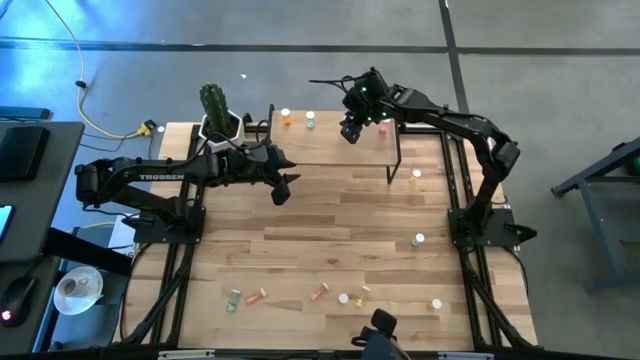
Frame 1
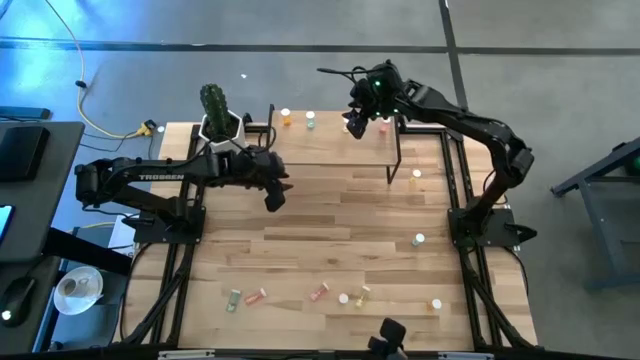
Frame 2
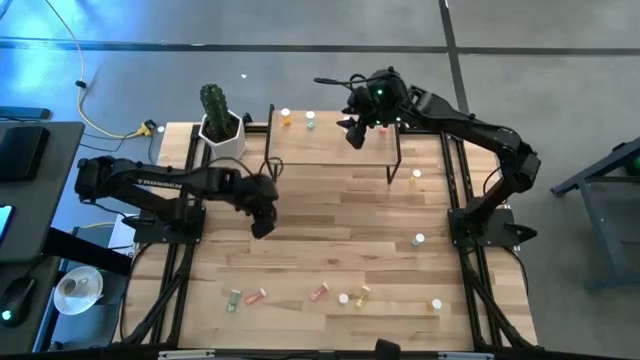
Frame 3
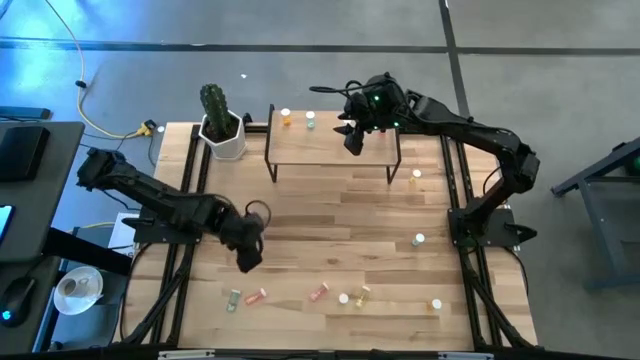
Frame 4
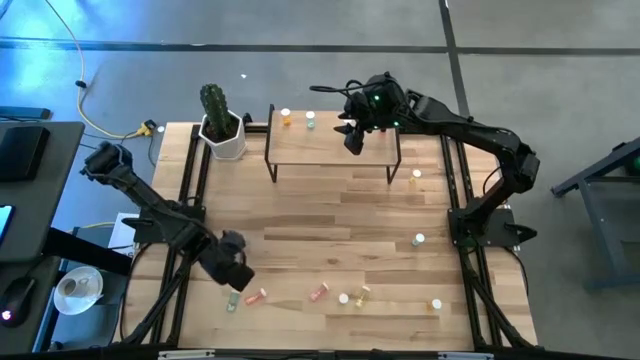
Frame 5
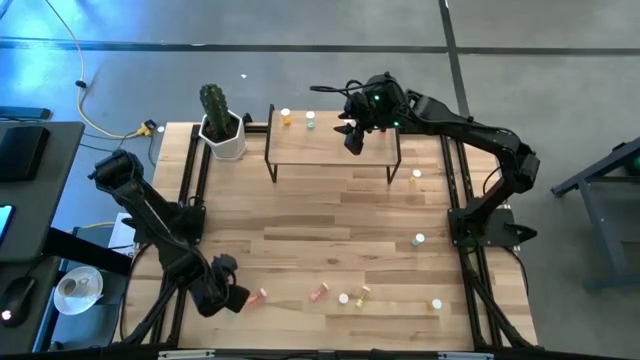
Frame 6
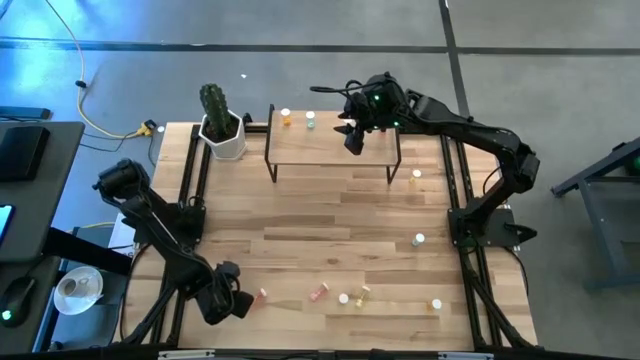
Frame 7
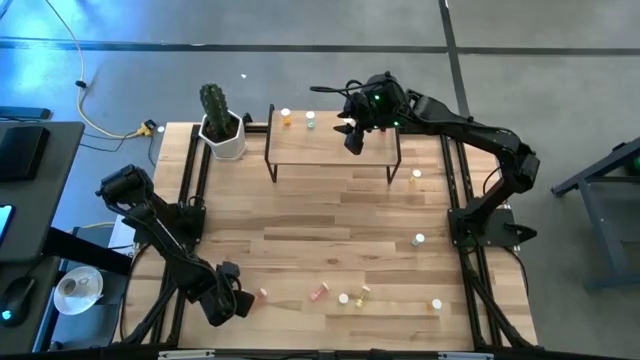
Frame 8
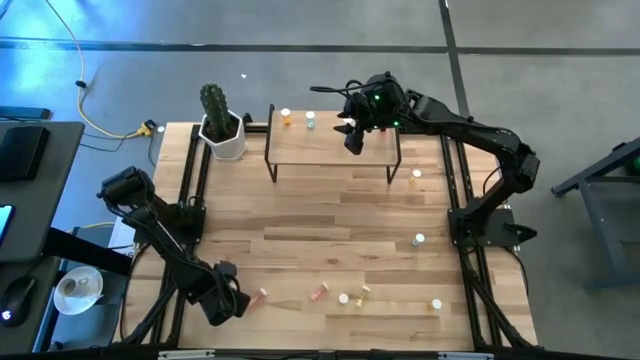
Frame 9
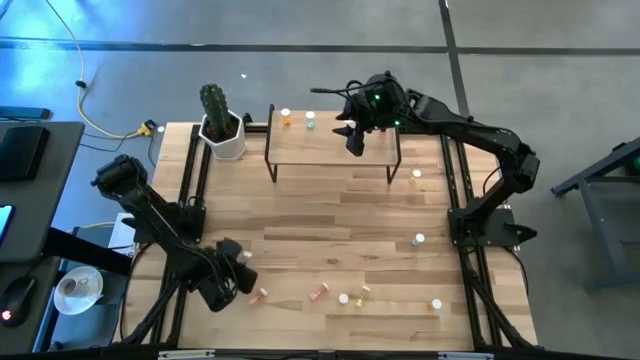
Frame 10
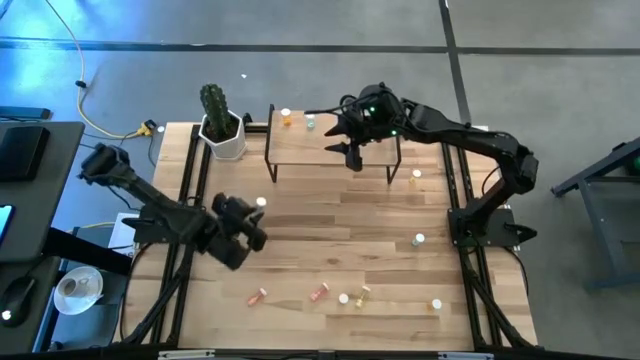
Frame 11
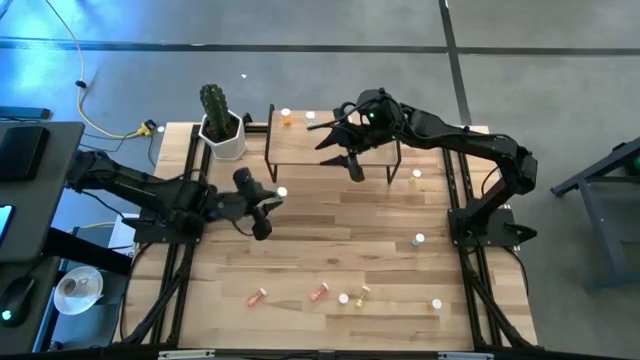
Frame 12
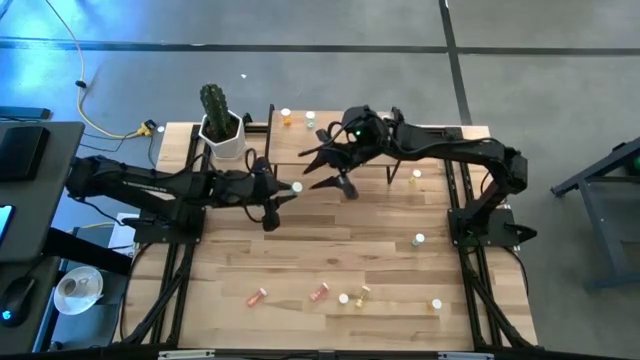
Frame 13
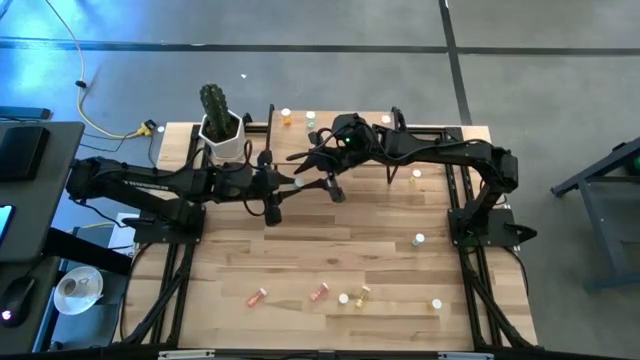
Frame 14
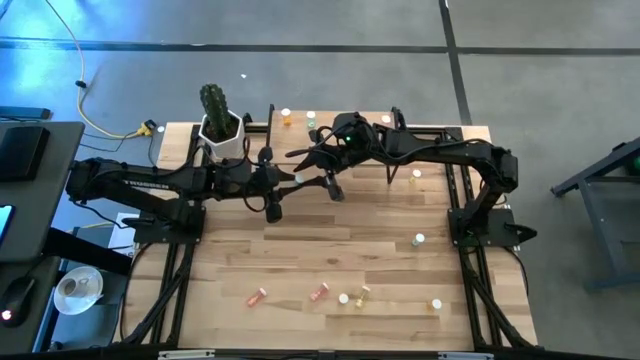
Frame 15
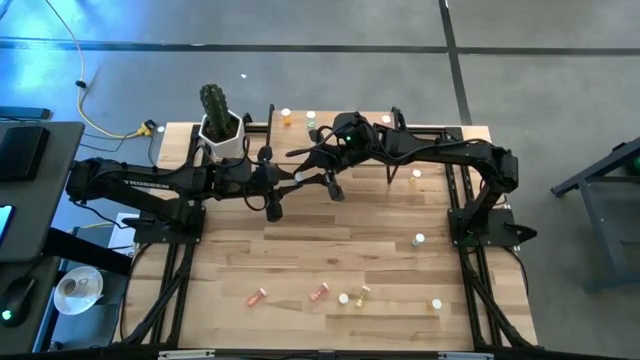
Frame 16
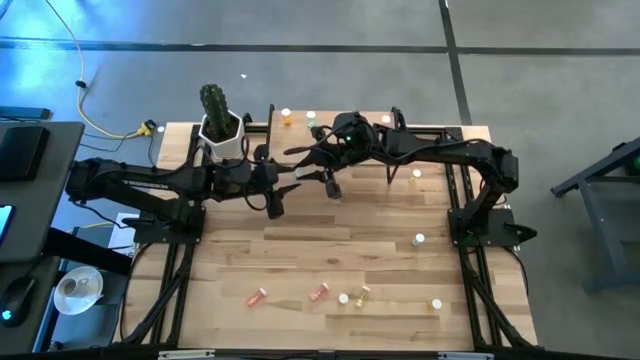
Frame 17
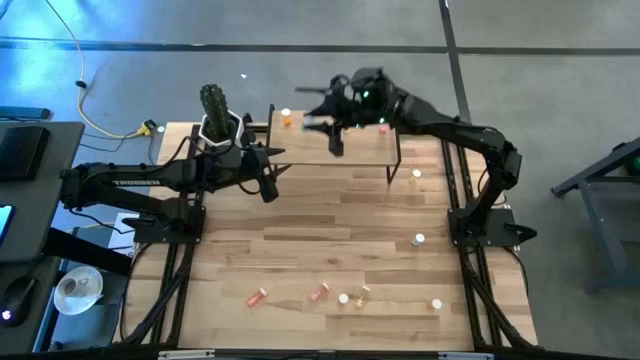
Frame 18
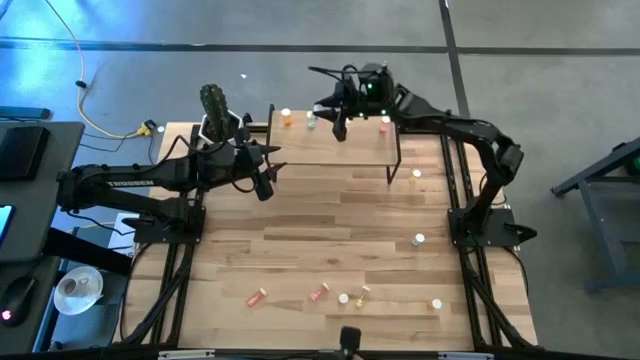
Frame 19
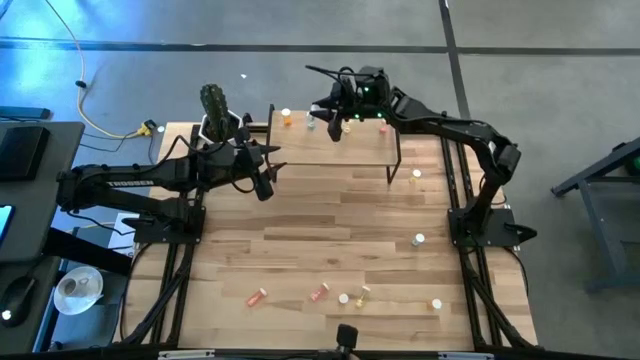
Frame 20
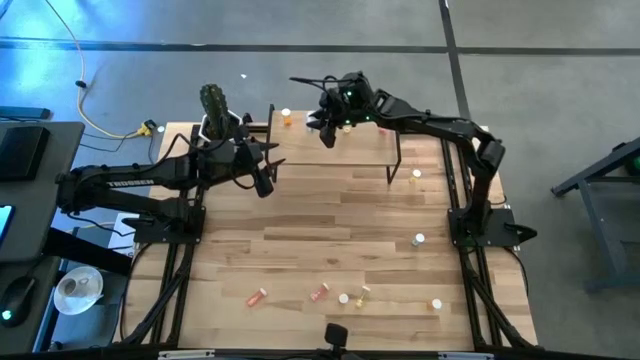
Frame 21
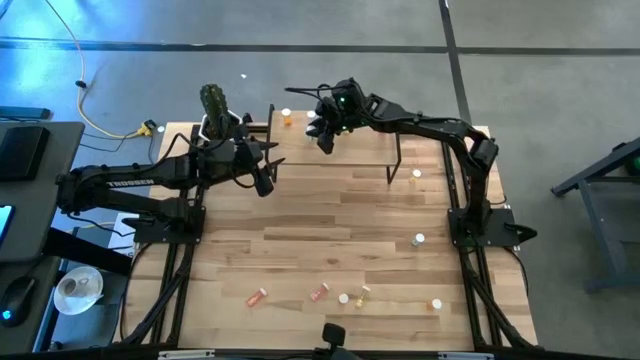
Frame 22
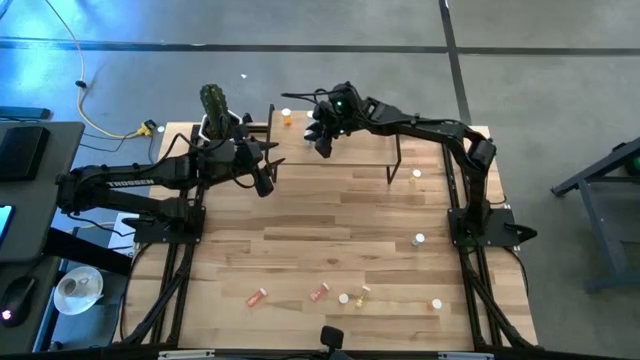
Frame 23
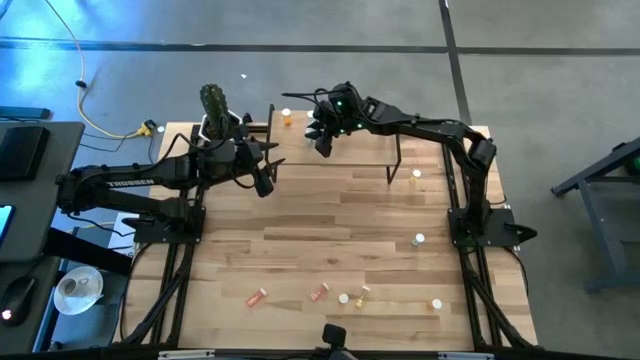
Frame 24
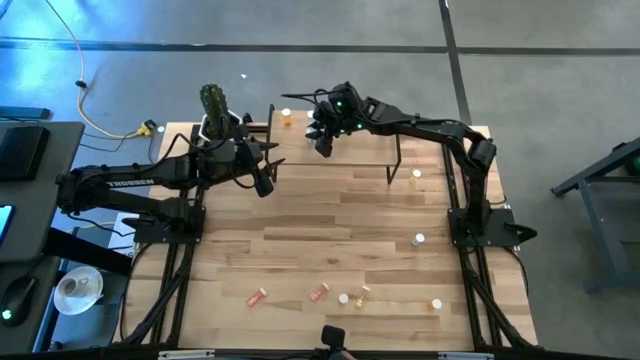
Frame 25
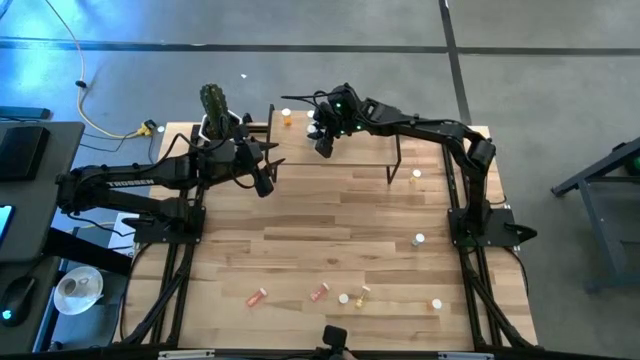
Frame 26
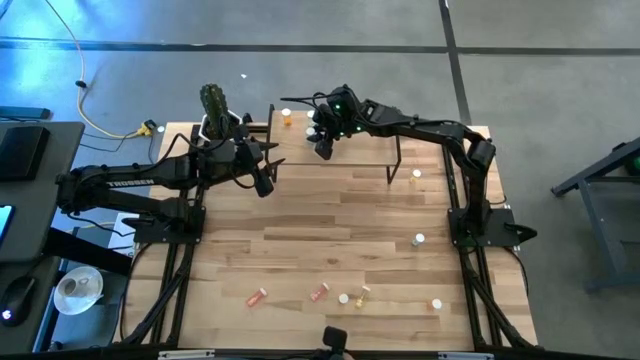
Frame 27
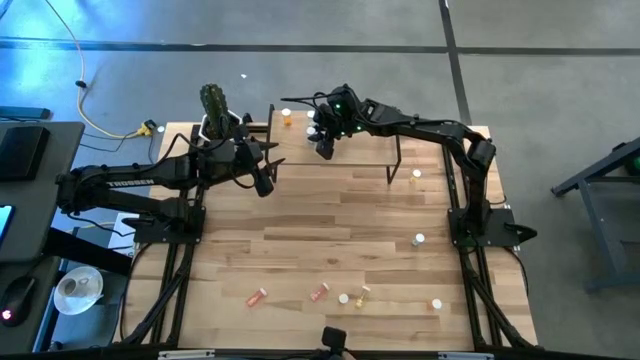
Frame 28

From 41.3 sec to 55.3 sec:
Task: Pick and place medicine bottles onto shelf by color
Put the bottom blue pill bottle on the shelf

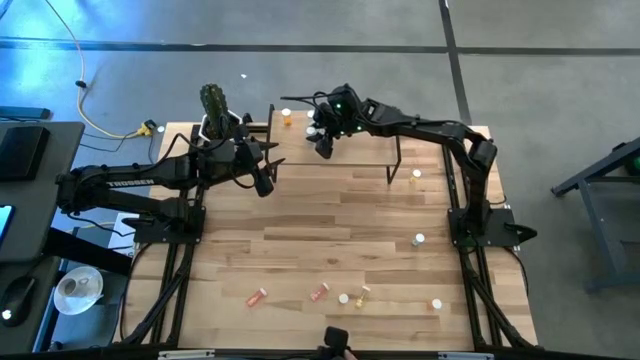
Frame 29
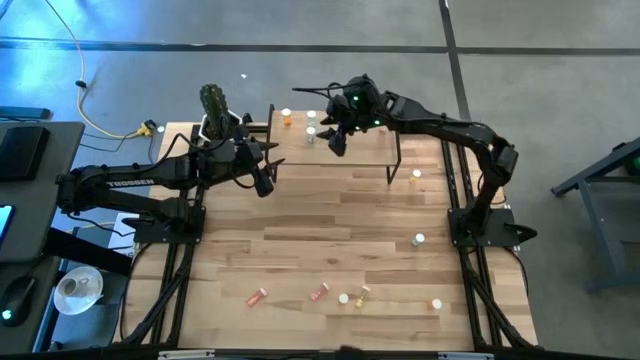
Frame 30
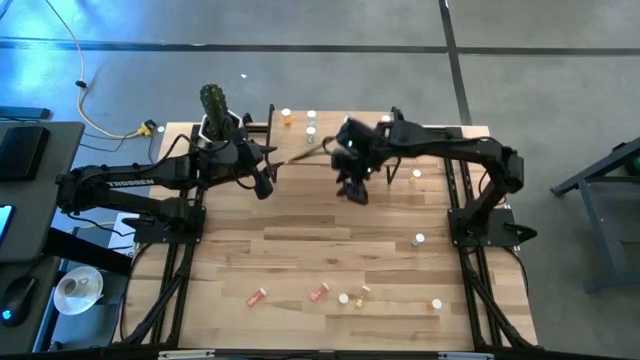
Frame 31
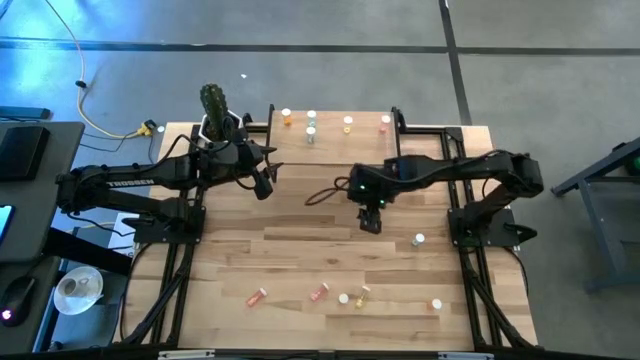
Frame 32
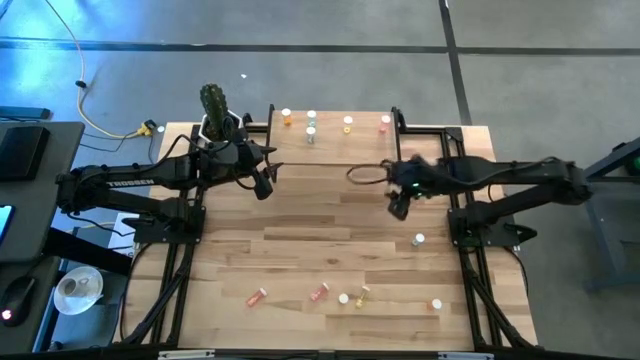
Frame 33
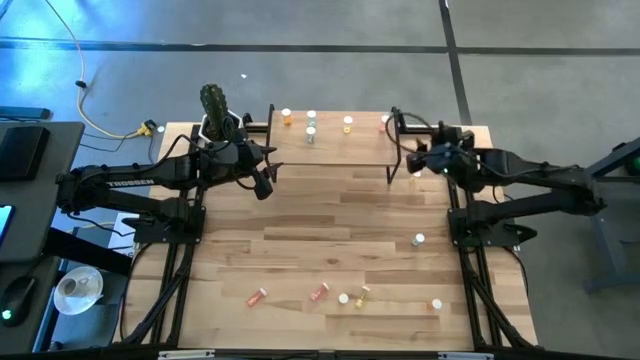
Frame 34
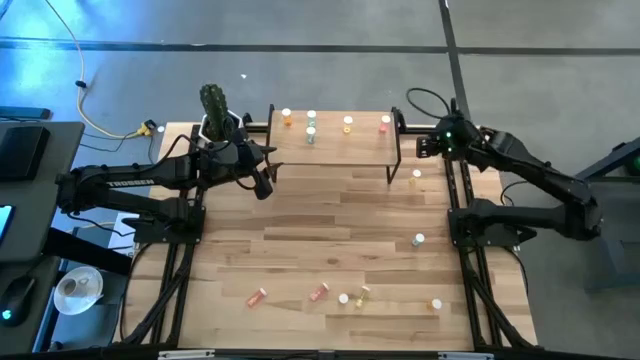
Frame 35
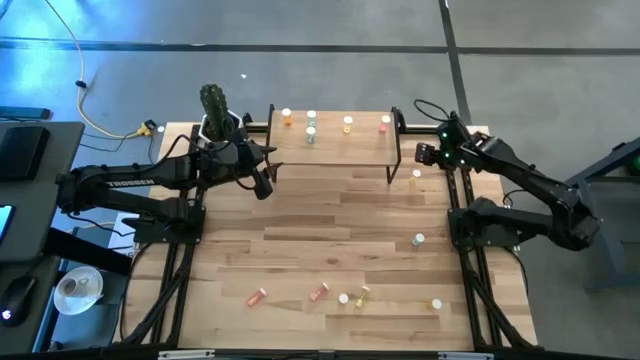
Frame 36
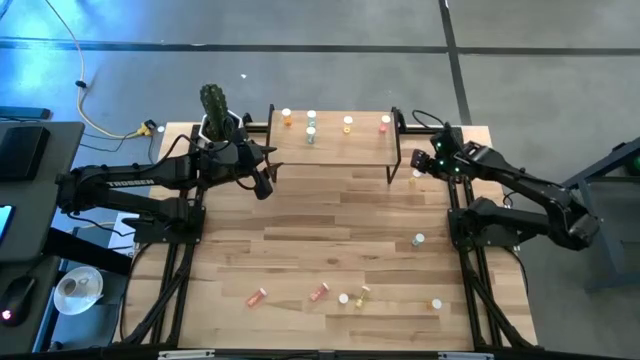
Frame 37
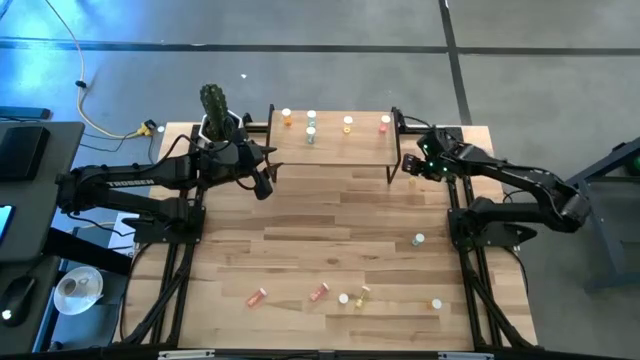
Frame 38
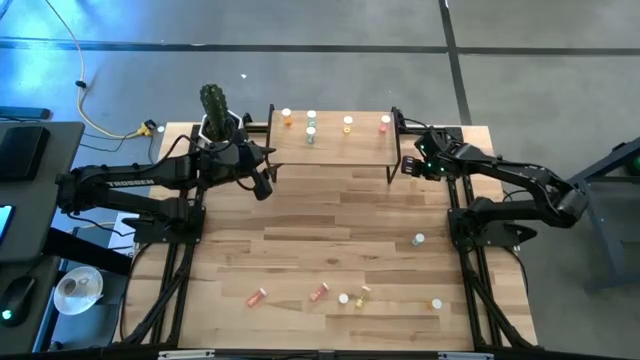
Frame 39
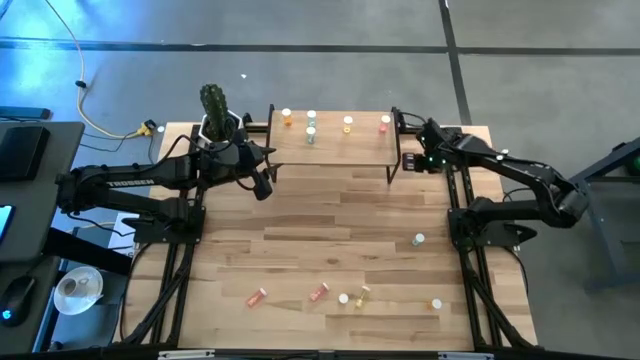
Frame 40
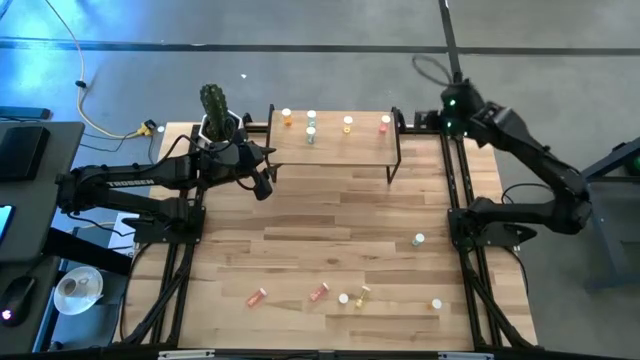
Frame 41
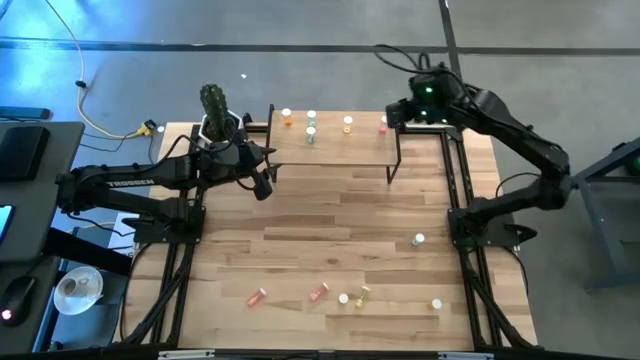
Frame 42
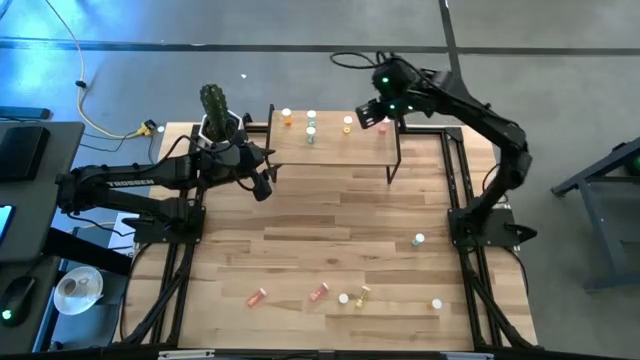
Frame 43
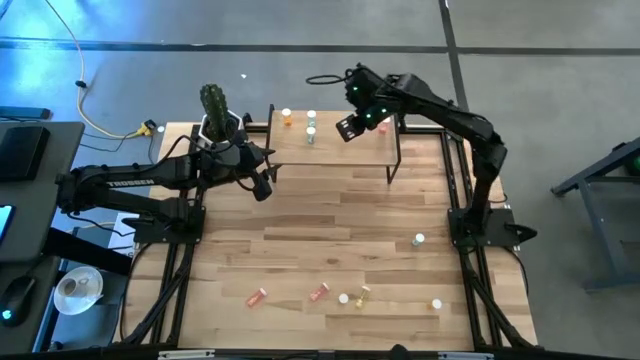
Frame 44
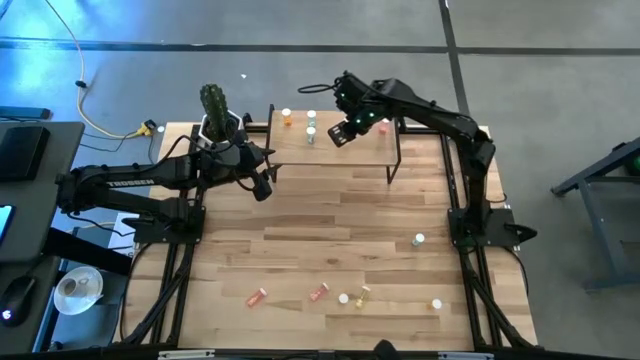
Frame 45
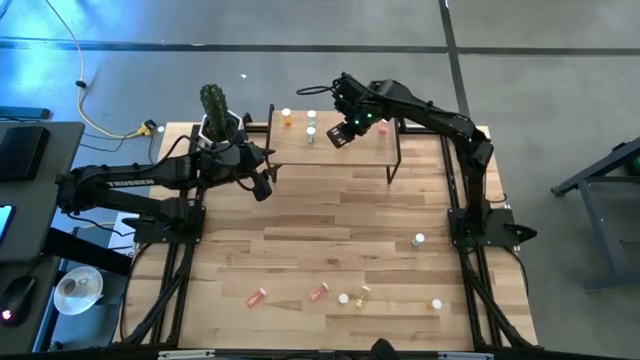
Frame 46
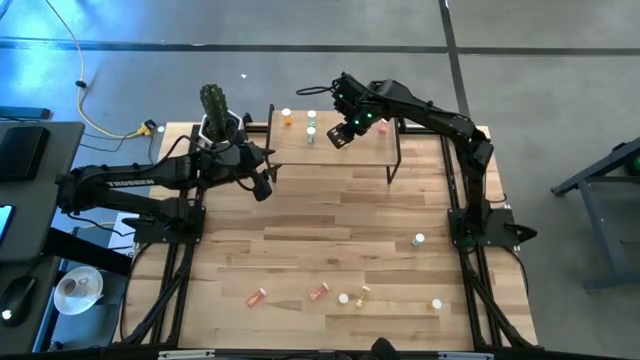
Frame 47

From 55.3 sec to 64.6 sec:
Put the top yellow pill bottle on the shelf
